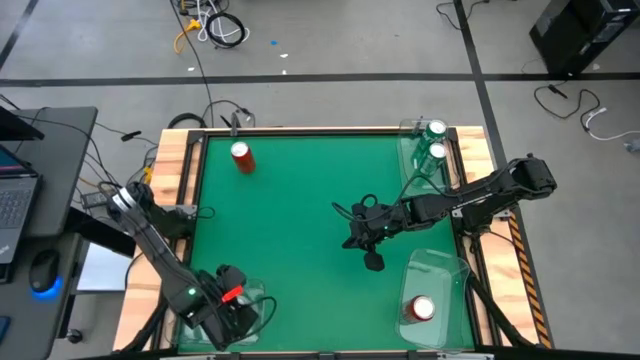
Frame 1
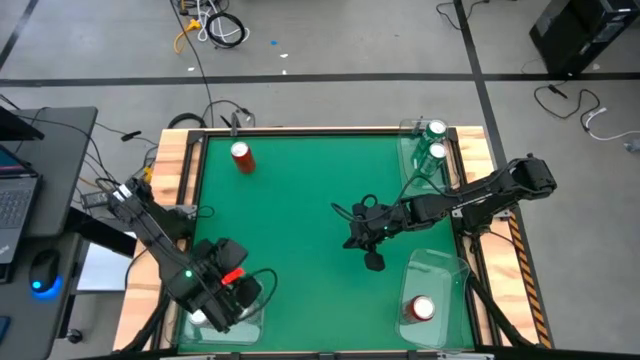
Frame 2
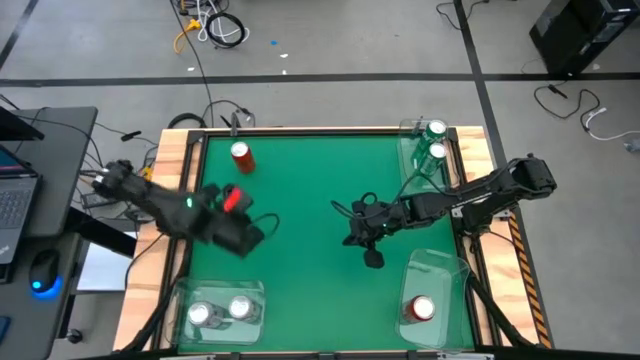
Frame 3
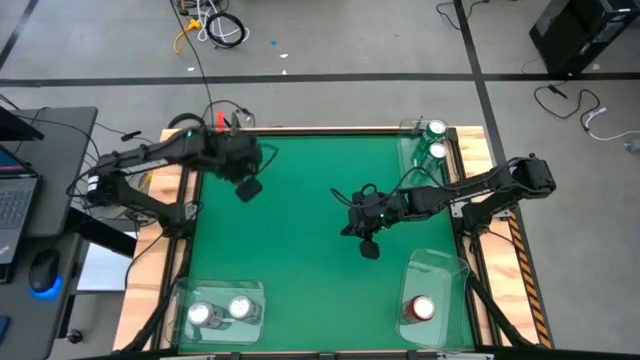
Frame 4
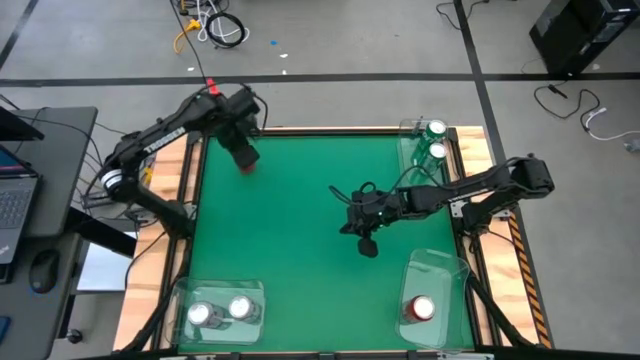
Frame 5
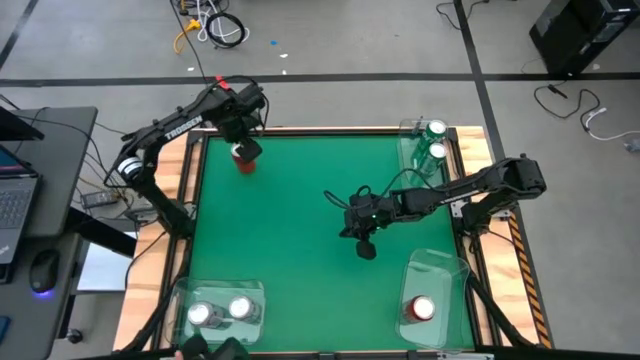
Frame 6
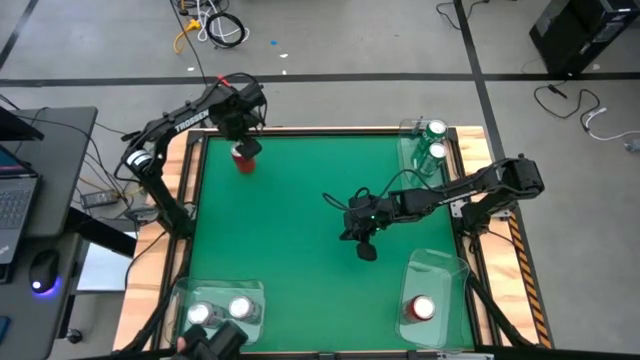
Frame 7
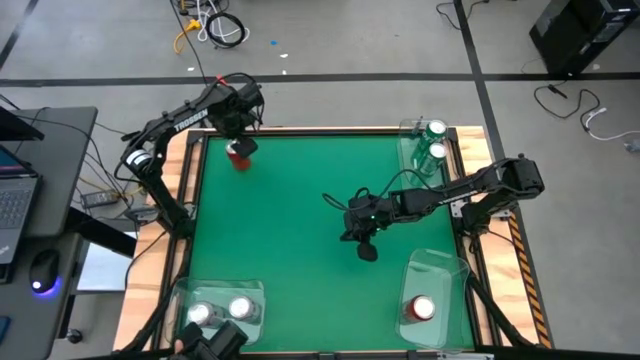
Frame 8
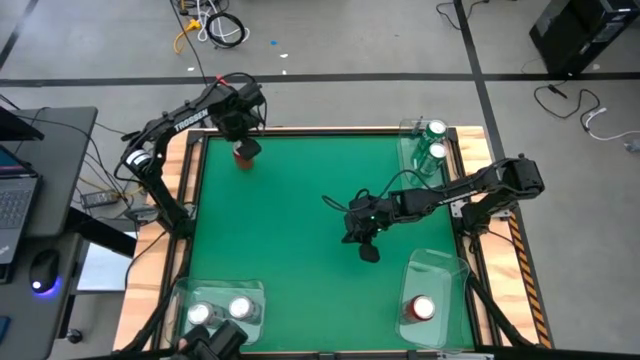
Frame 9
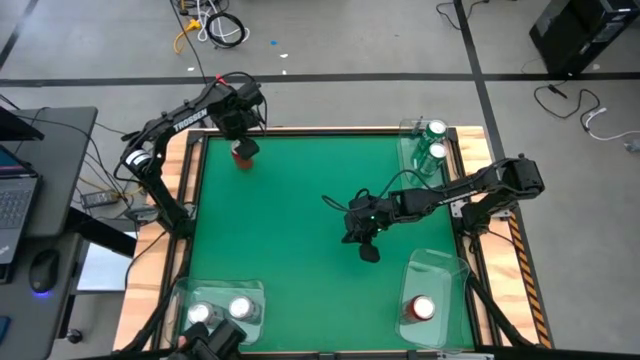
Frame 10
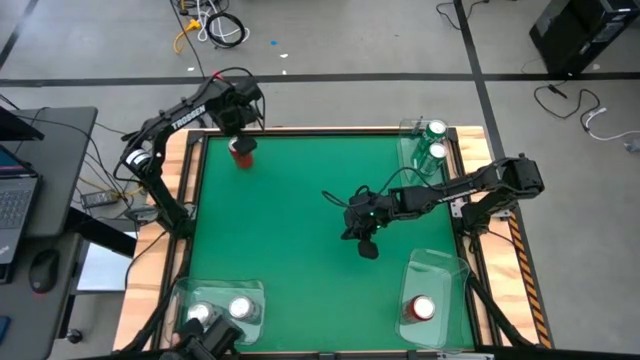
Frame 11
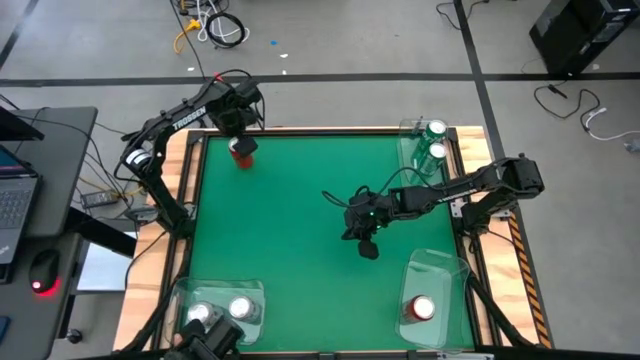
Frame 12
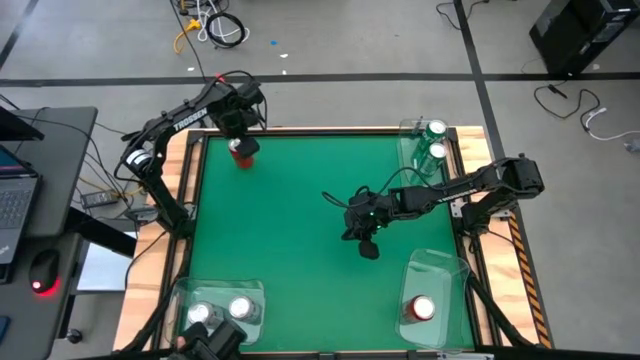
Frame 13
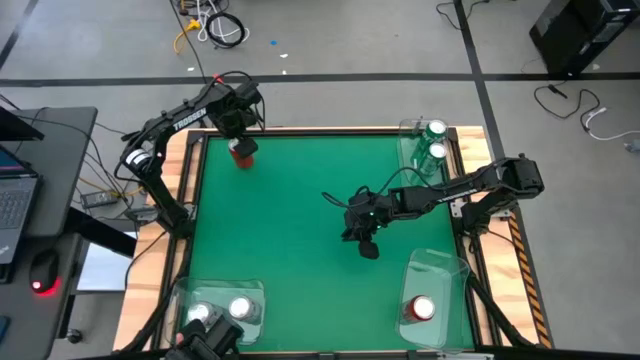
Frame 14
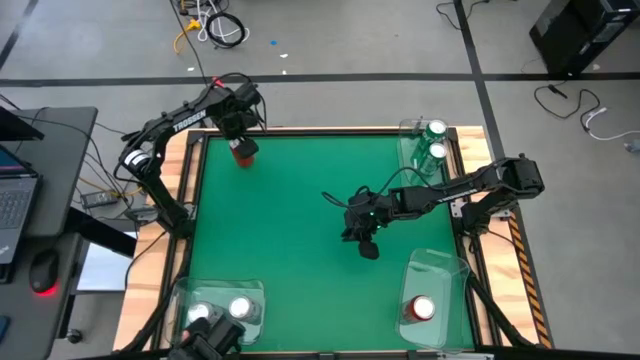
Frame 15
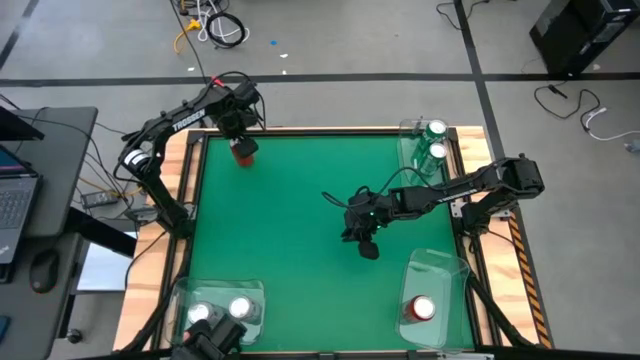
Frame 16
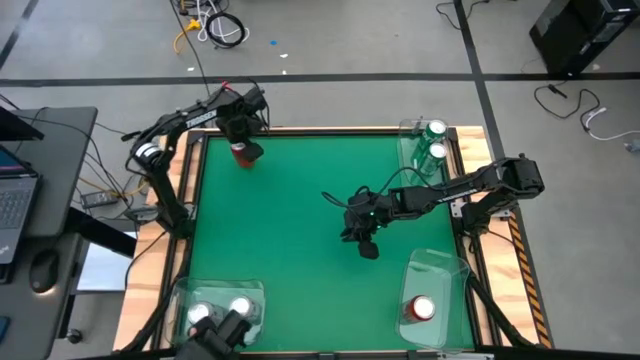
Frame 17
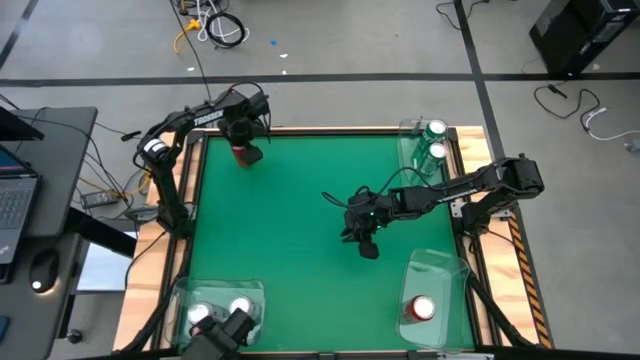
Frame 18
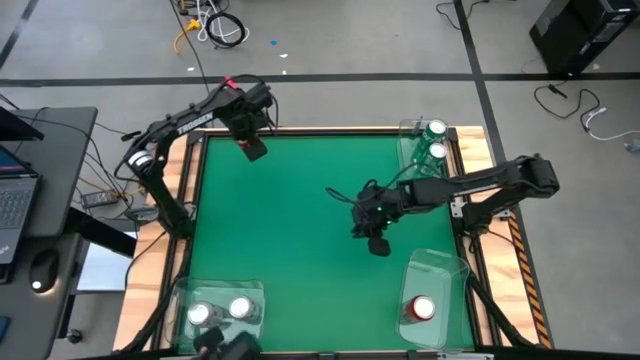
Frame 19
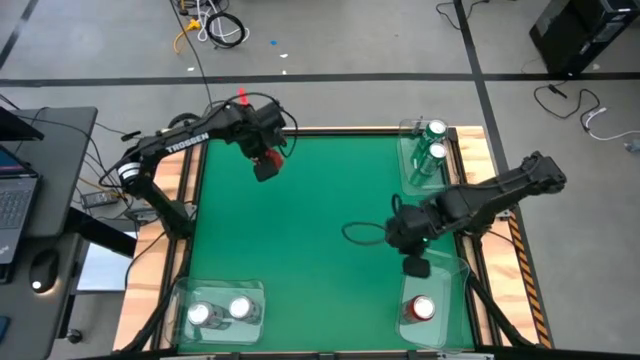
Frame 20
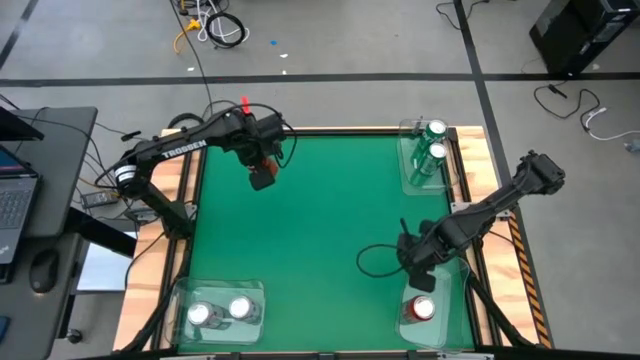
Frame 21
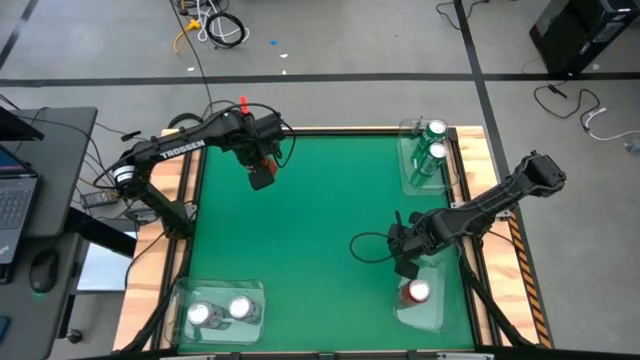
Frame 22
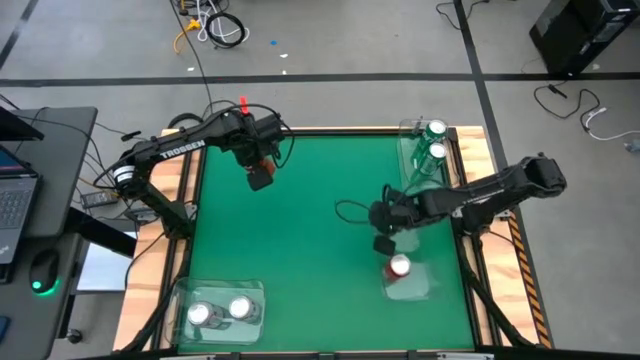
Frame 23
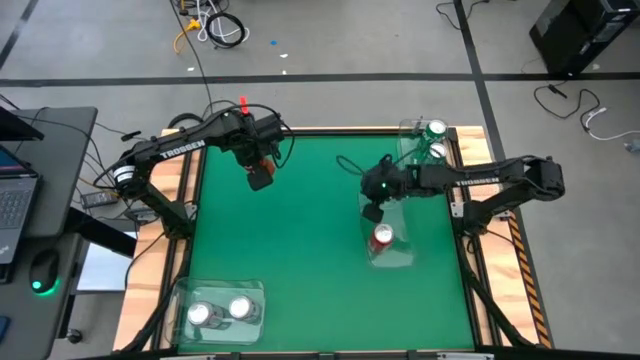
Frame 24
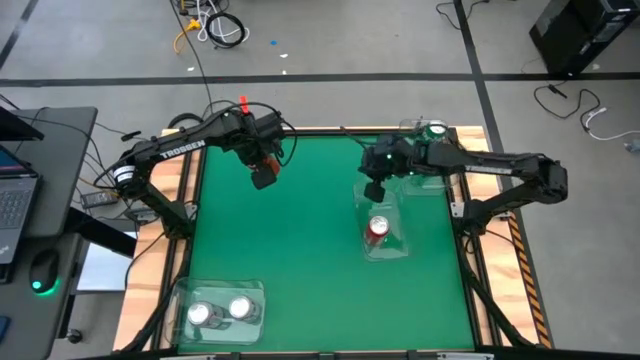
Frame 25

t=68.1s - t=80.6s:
Task: Sort soda cans
Put the red-black soda can into the top center transparent bin

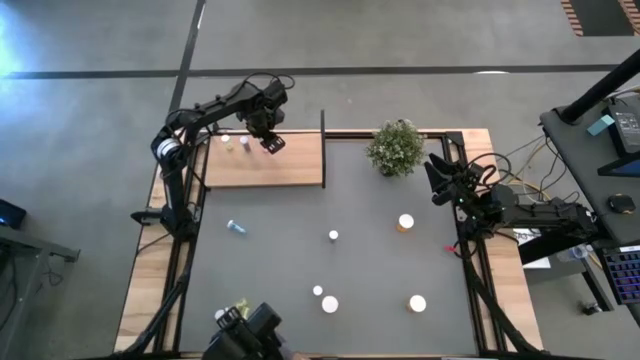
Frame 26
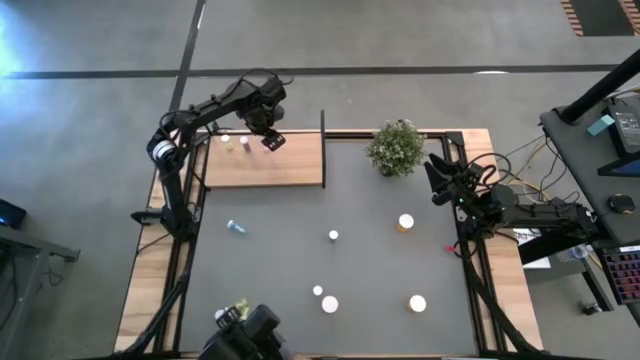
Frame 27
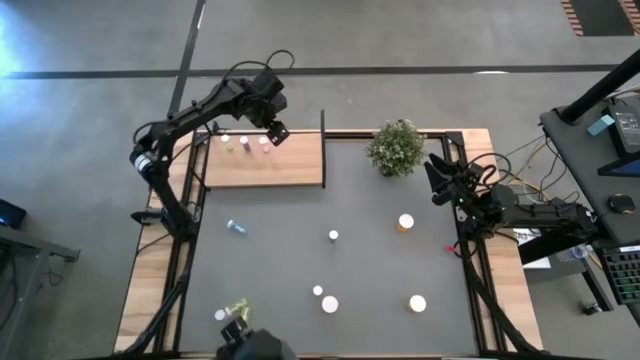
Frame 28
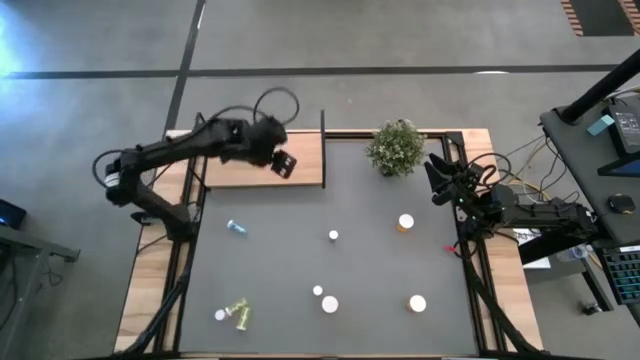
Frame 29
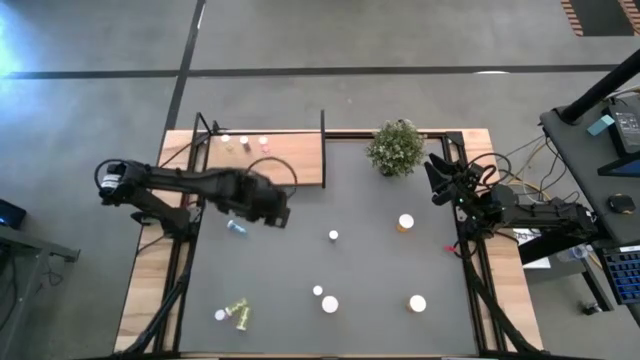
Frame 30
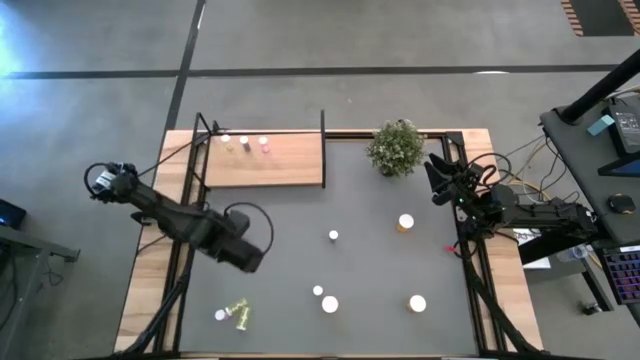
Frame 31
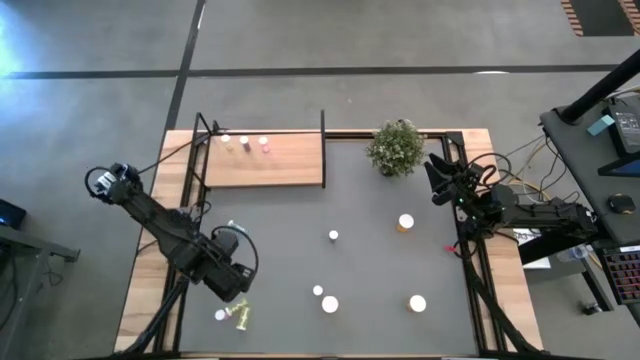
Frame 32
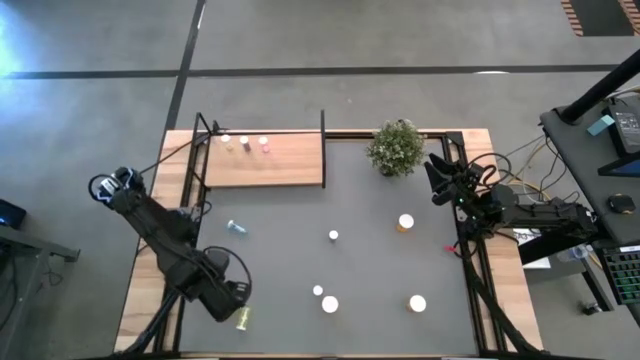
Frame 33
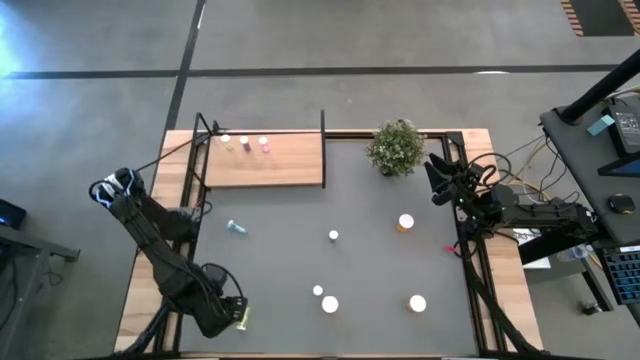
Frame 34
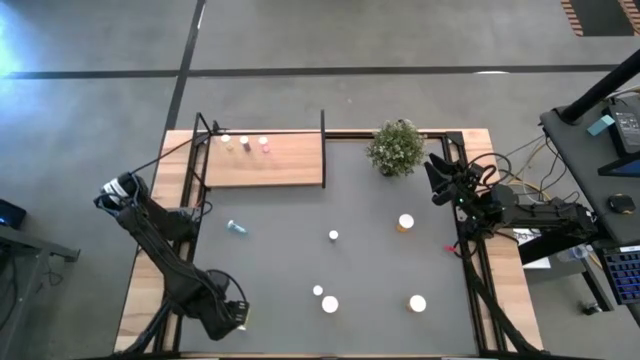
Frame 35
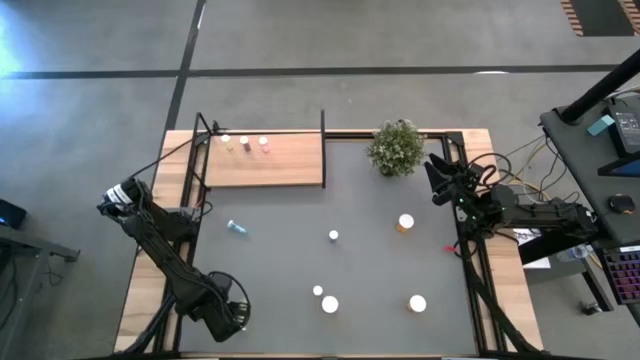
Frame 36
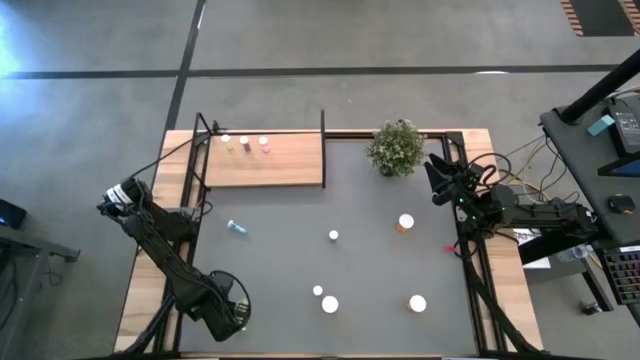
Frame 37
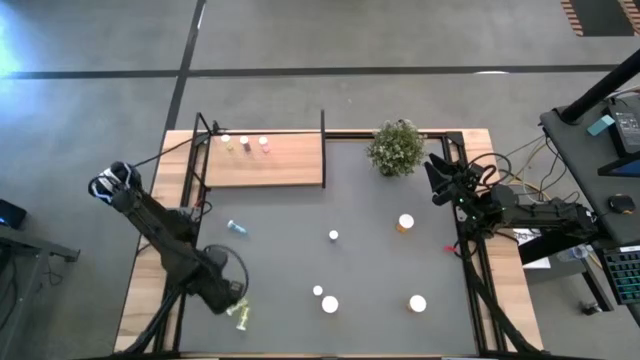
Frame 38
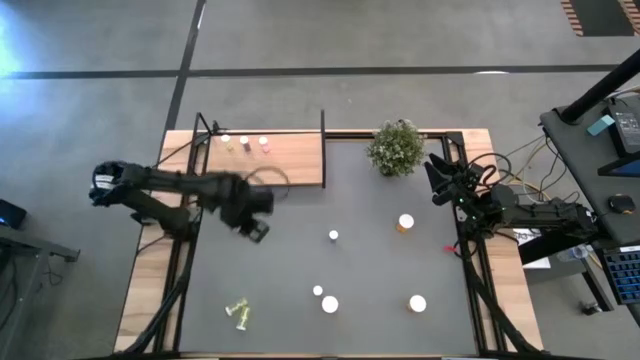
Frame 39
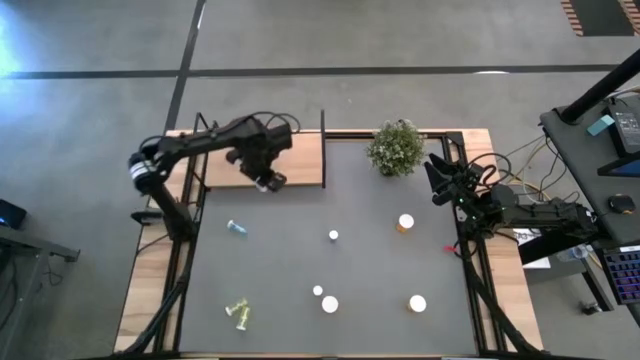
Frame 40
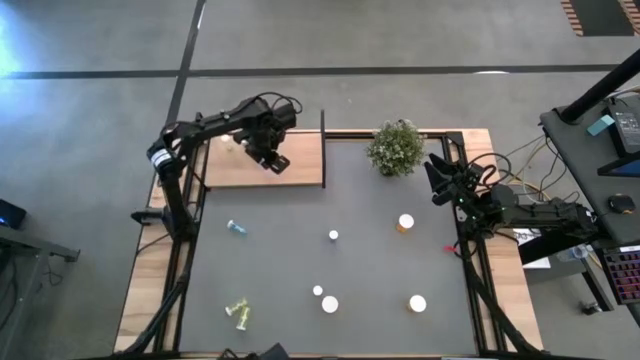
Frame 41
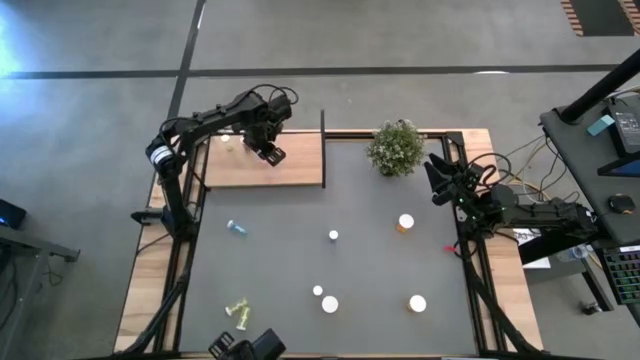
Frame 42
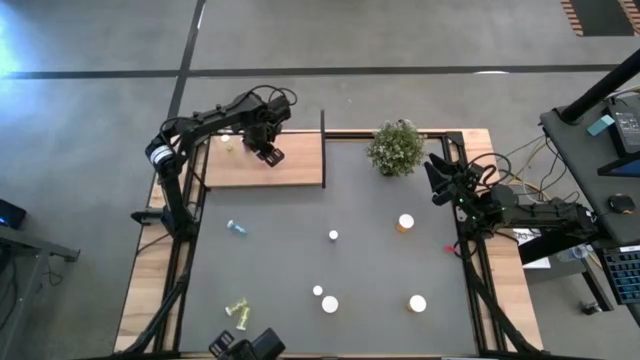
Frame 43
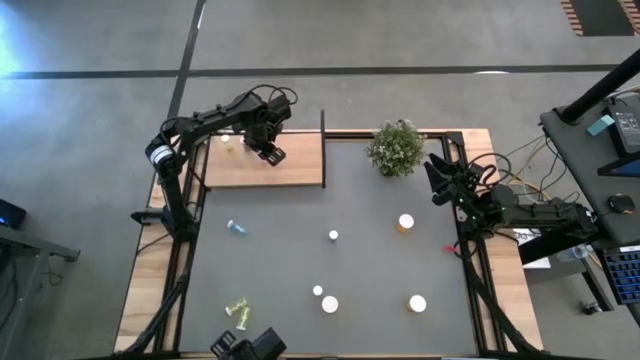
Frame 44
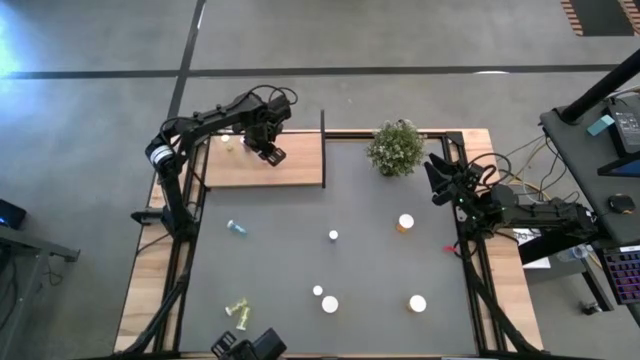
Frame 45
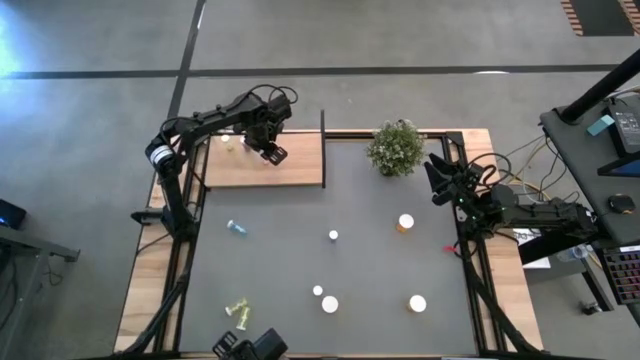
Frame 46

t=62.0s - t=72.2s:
Task: Pick and place medicine bottles onto shelf by color
Put the left pink pill bottle on the shelf aligned with the other pink bottle
